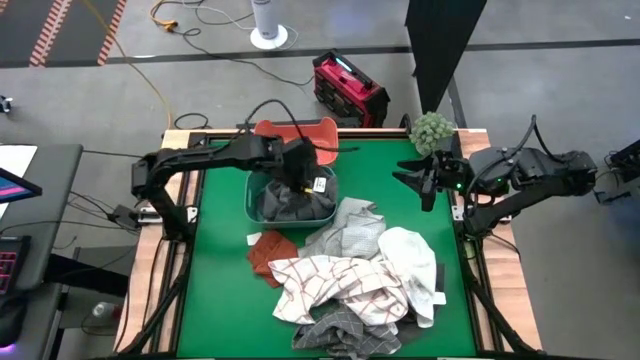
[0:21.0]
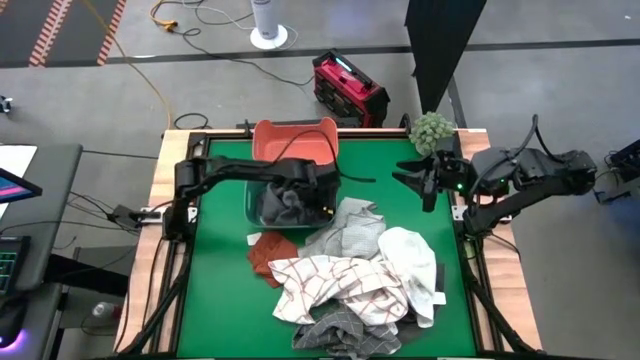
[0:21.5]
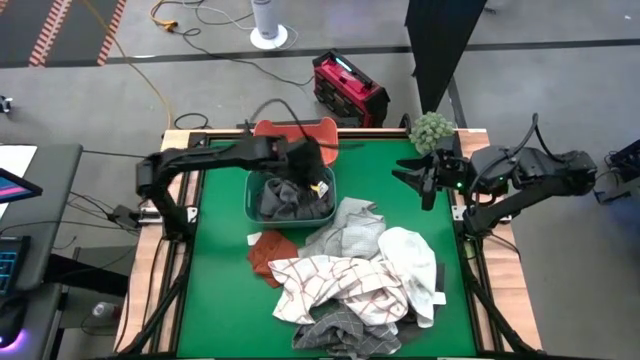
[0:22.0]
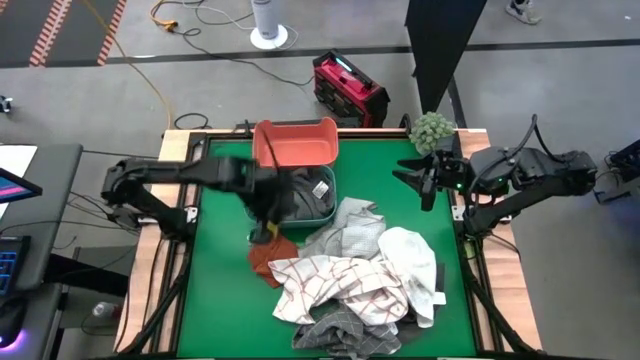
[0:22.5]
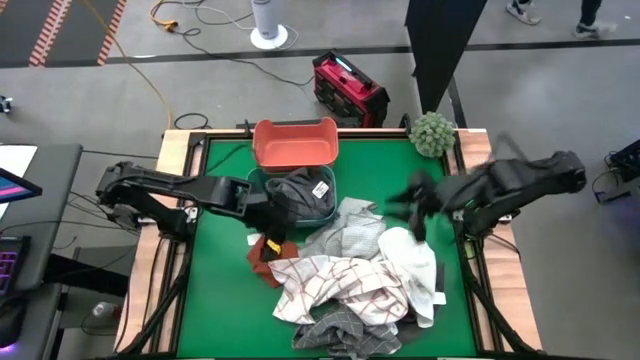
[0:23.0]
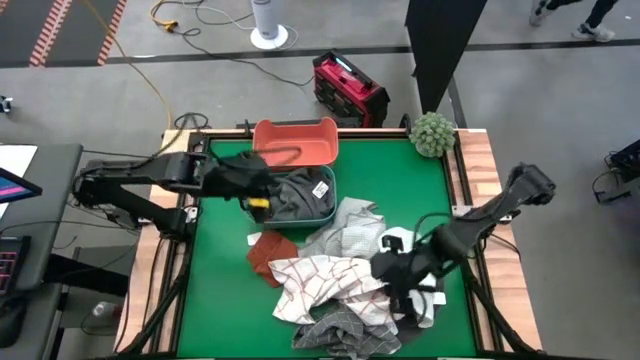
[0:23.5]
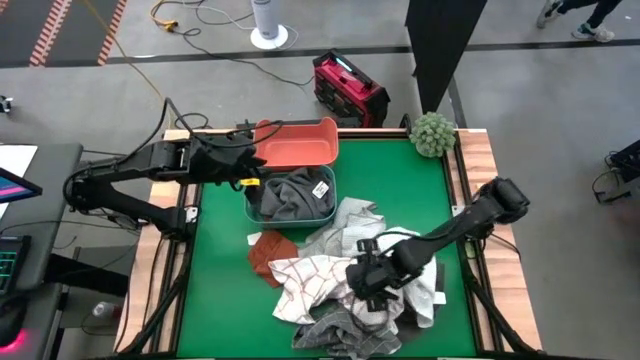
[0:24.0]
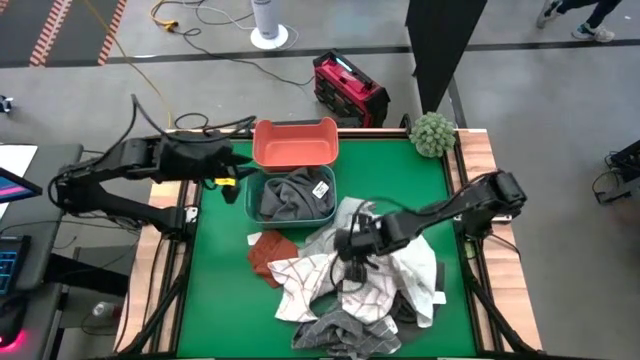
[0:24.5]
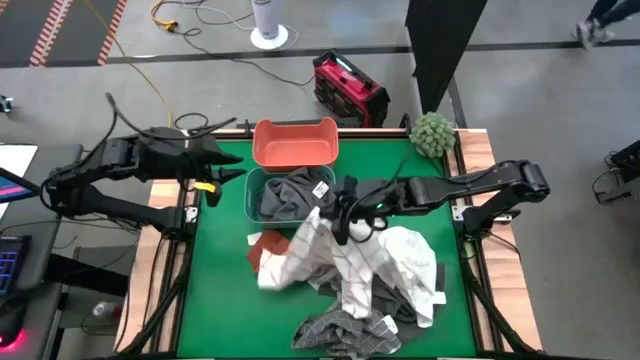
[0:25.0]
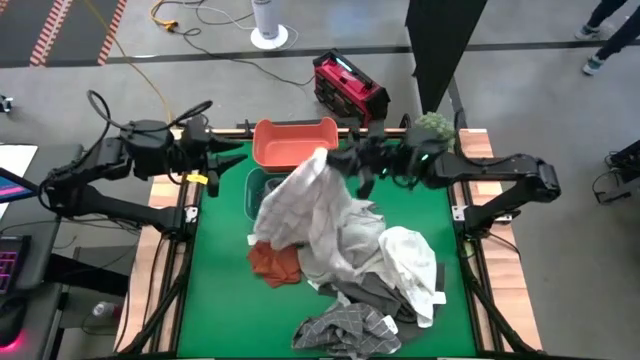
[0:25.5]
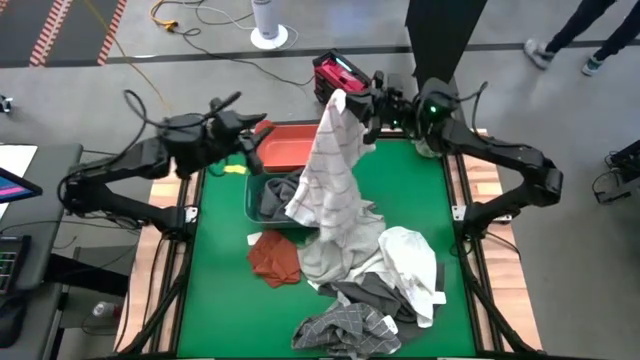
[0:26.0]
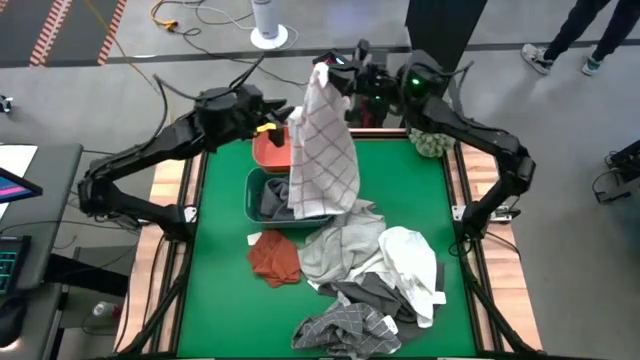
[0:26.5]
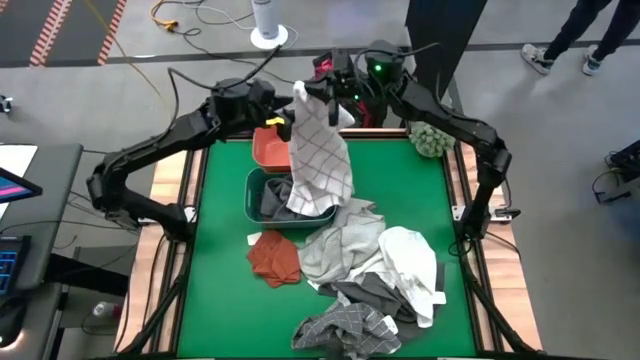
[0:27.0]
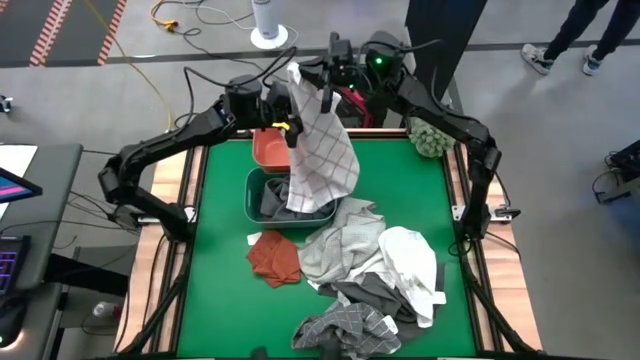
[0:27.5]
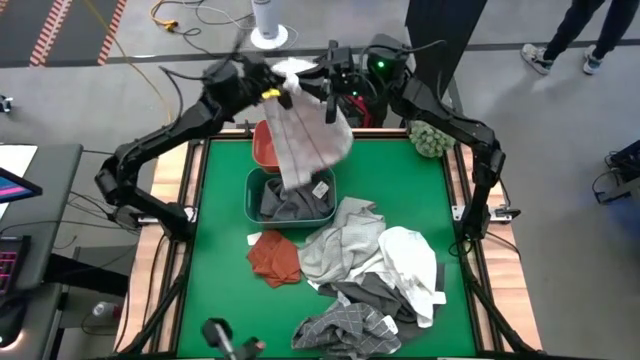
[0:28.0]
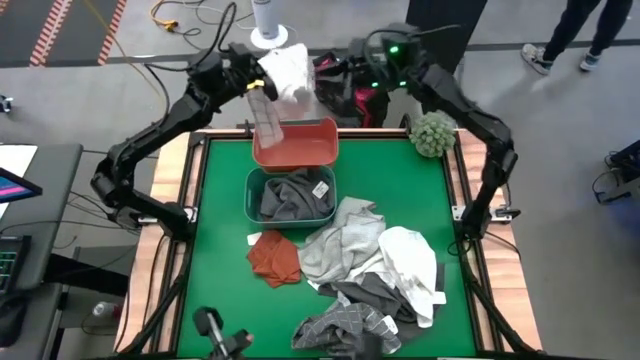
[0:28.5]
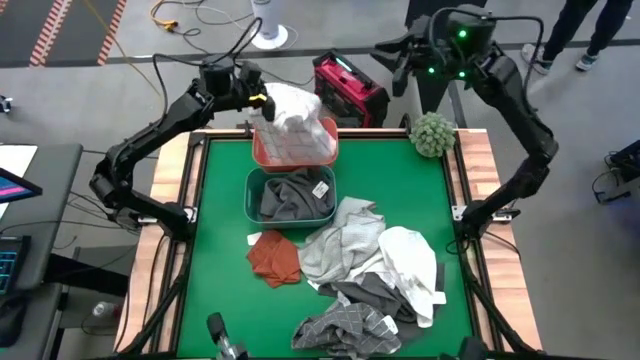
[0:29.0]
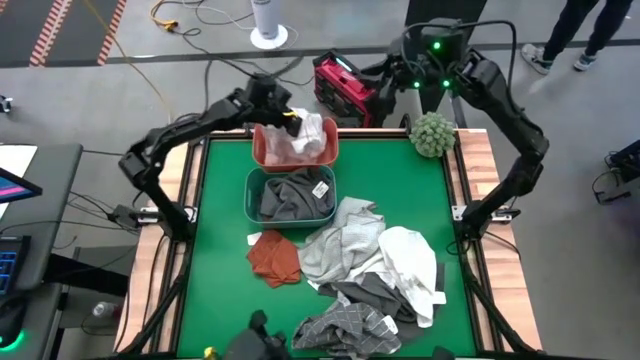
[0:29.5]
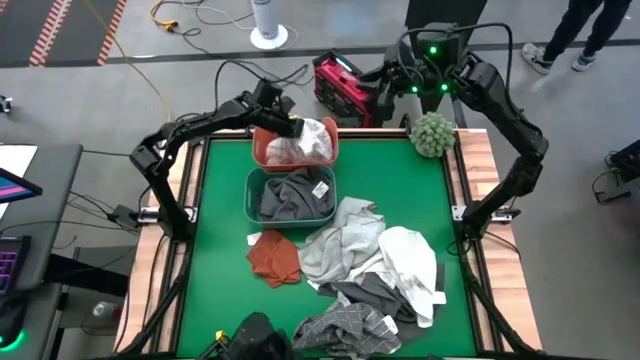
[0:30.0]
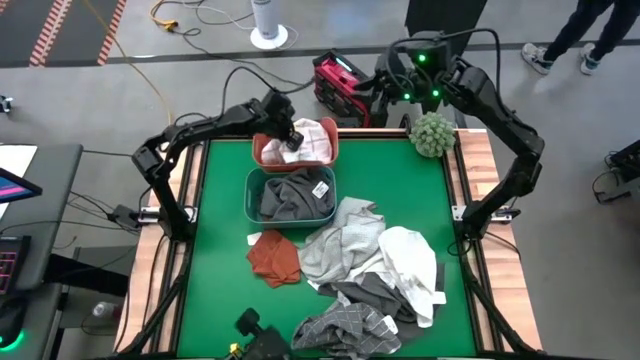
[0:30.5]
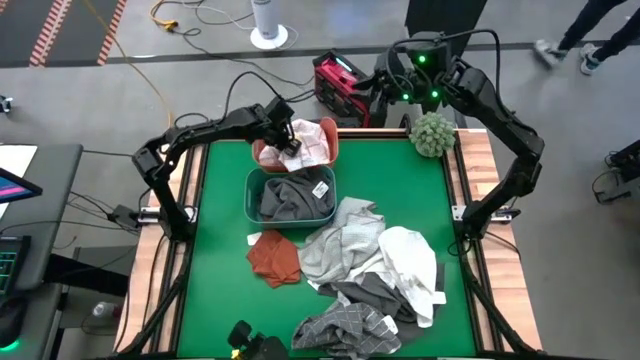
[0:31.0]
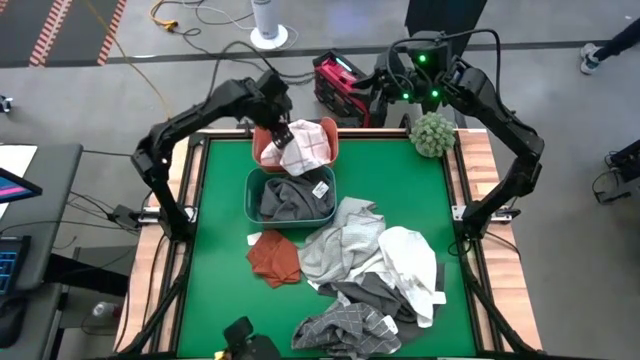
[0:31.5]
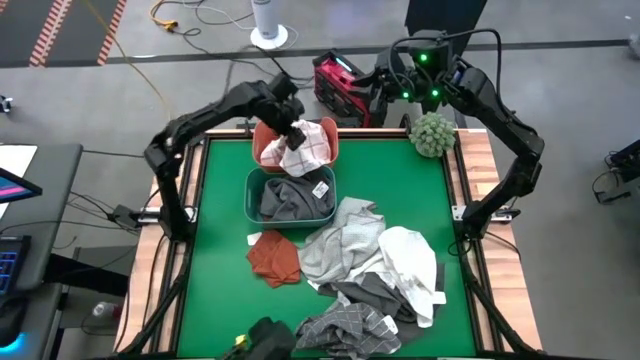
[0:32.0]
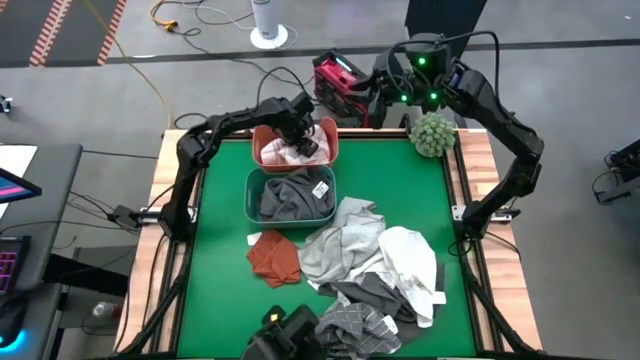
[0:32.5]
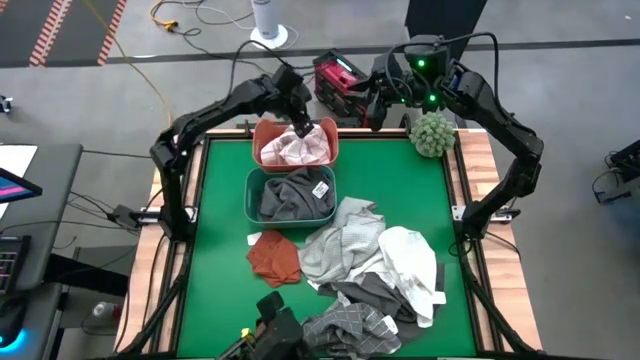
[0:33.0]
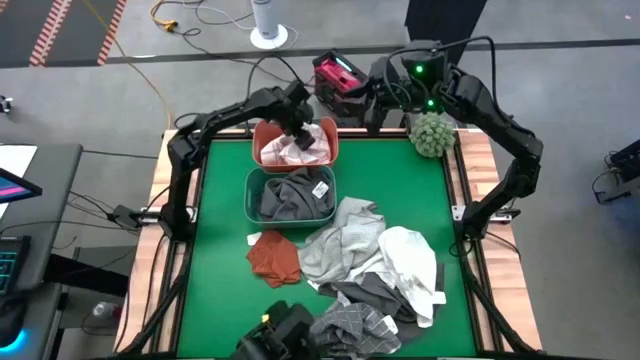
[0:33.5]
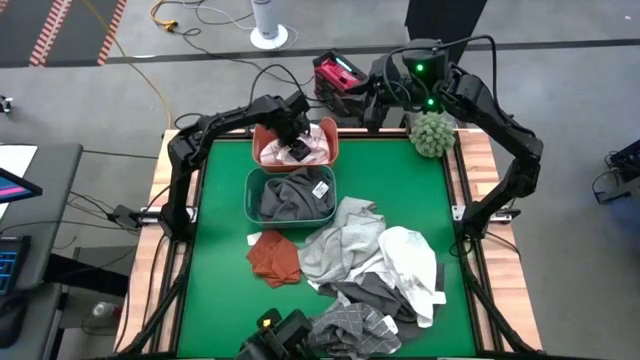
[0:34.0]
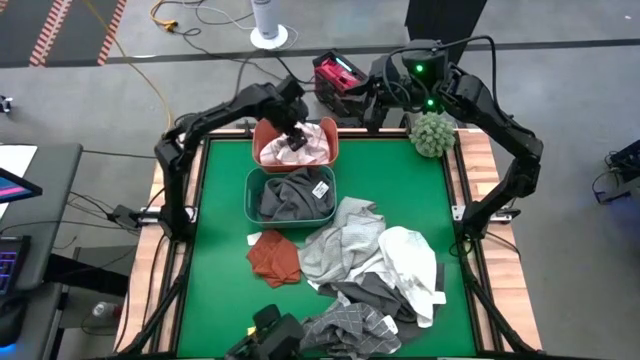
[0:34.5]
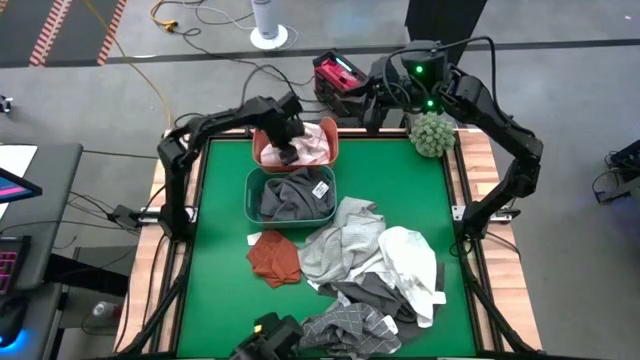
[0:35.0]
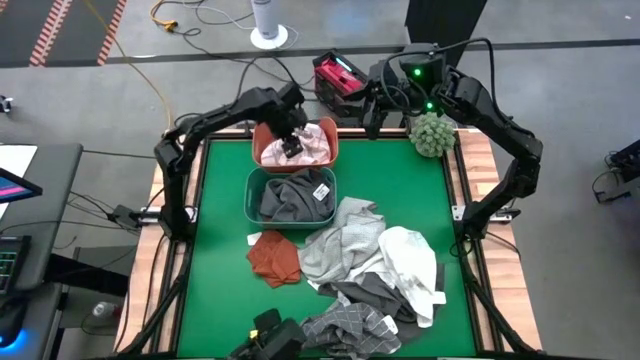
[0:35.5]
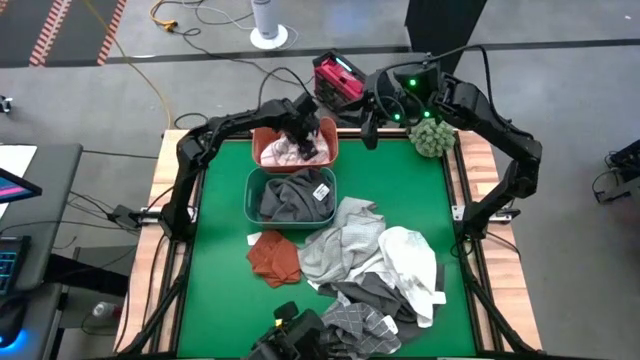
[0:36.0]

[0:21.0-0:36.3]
Task: Sort towels by color in basket
Put the white and brown patterned towel into the orange bin

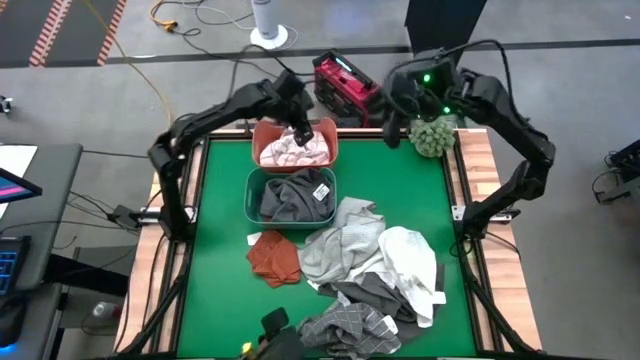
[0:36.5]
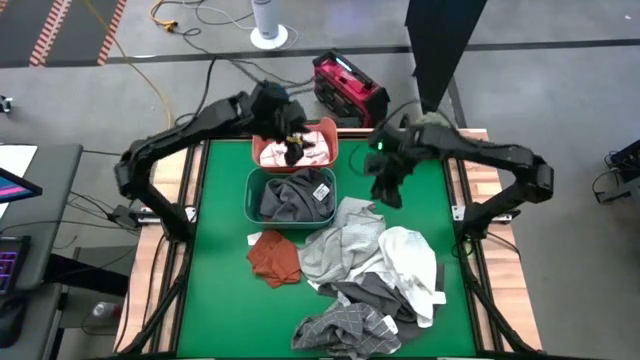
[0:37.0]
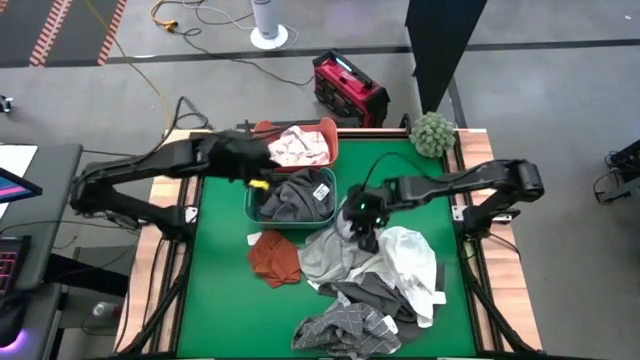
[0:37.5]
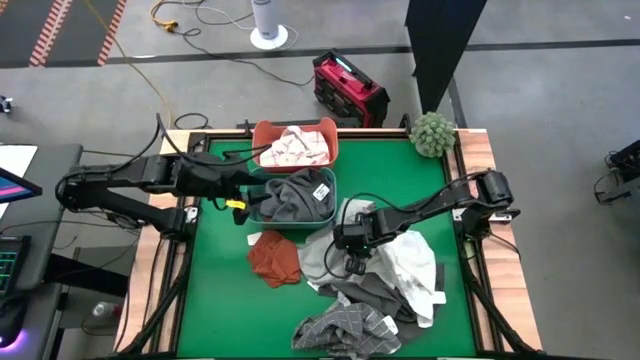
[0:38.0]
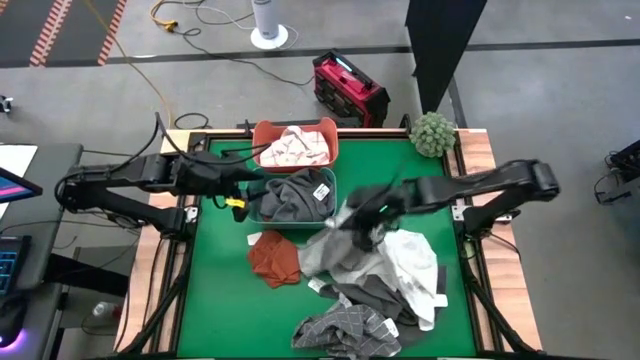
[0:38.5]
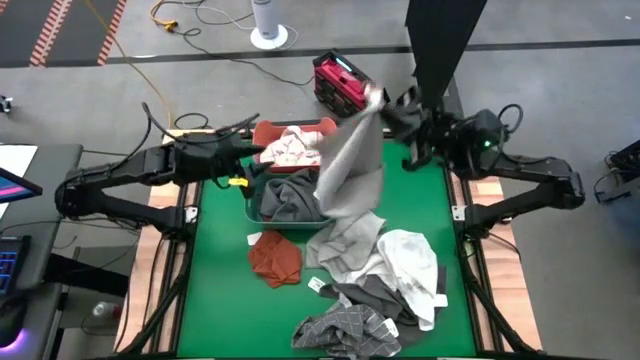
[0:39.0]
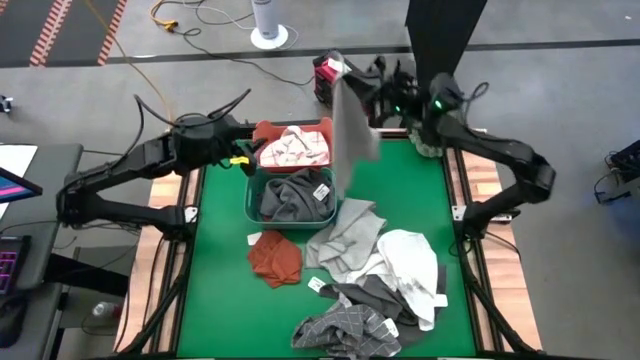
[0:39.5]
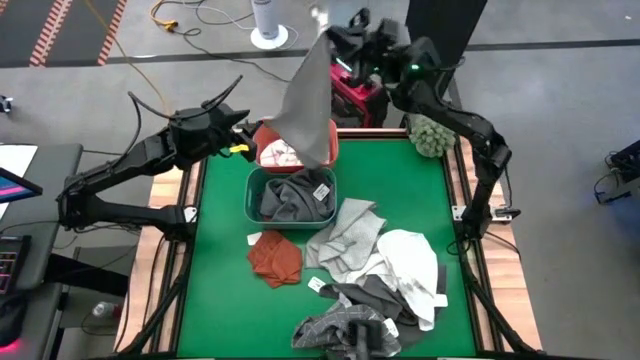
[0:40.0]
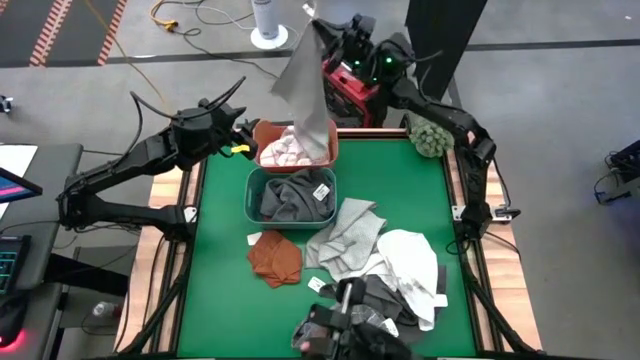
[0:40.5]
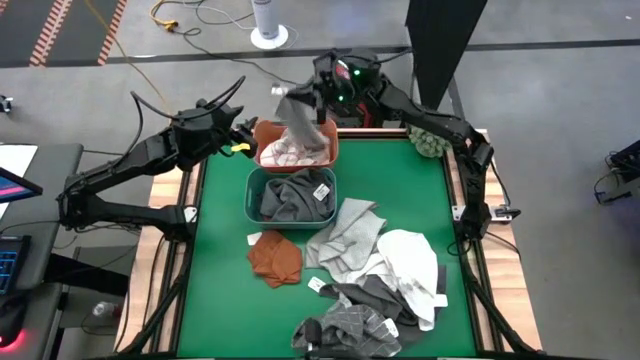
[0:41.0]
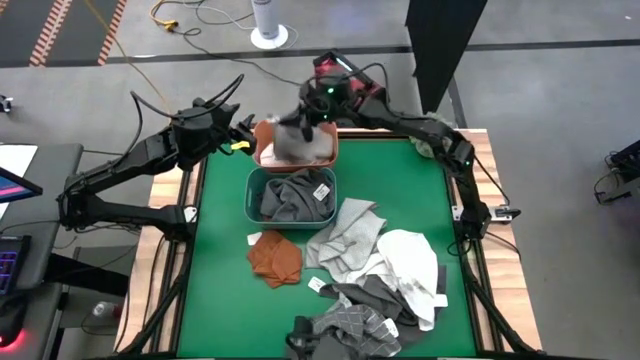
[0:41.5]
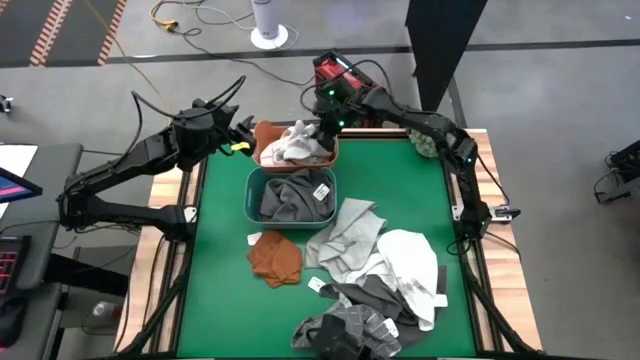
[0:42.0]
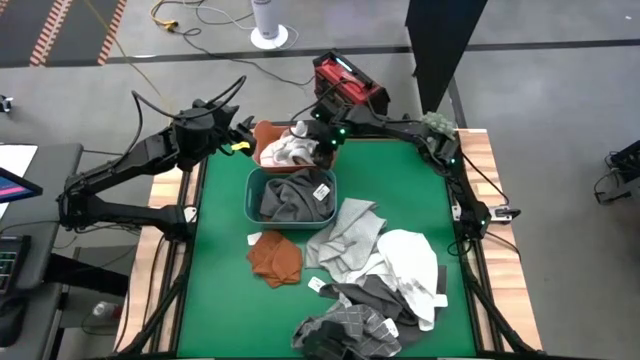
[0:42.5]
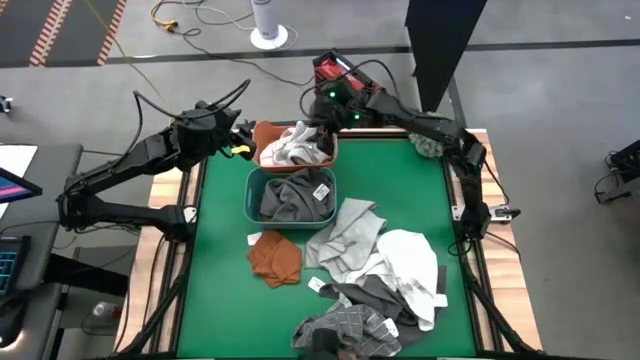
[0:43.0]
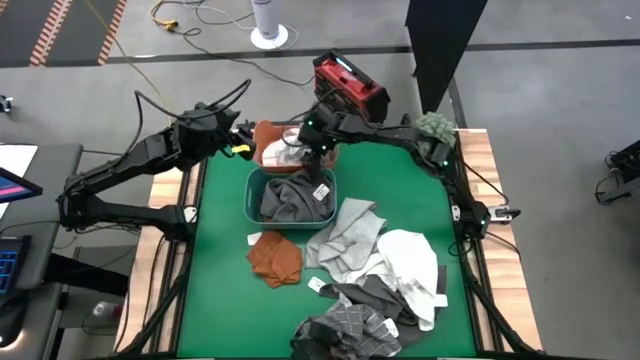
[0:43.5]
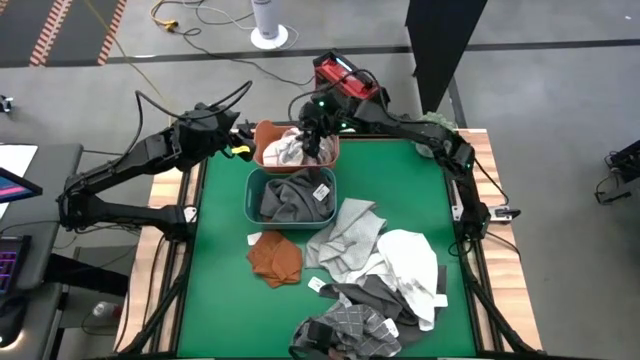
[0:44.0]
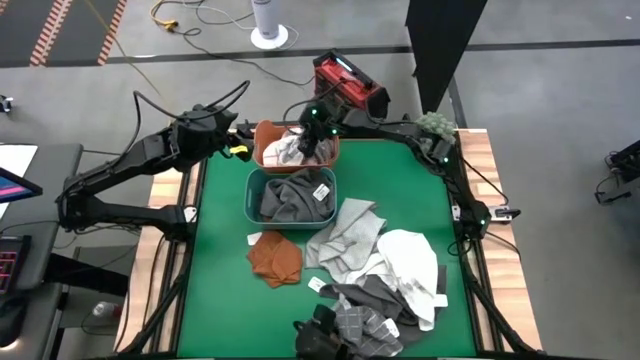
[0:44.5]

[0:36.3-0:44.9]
Put the light gray towel into the orange bin
